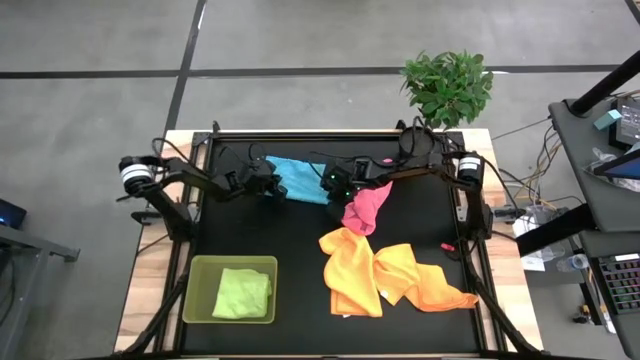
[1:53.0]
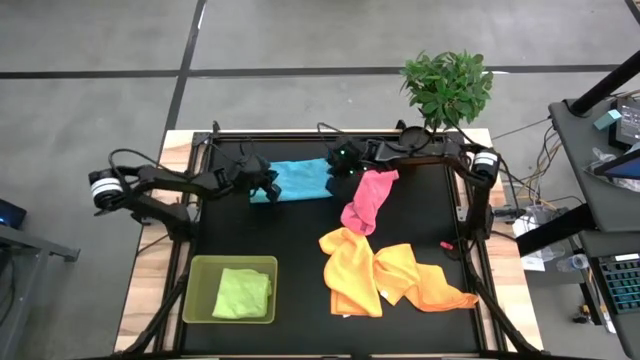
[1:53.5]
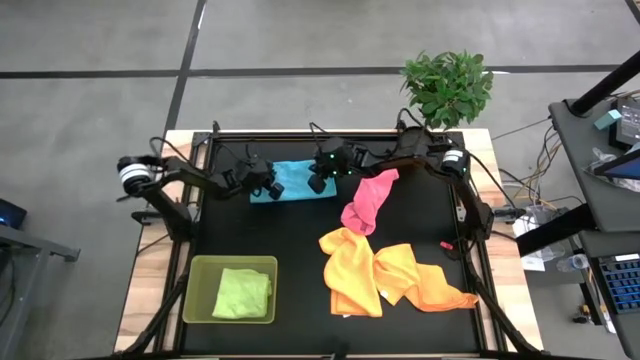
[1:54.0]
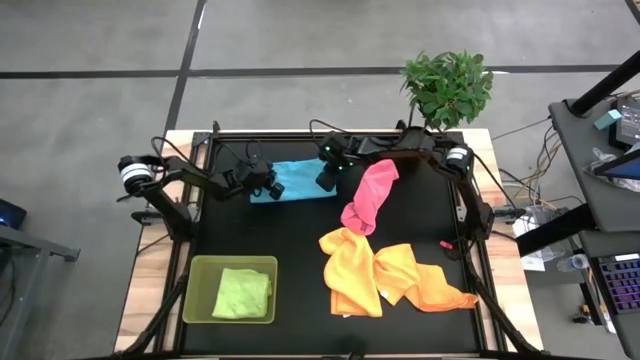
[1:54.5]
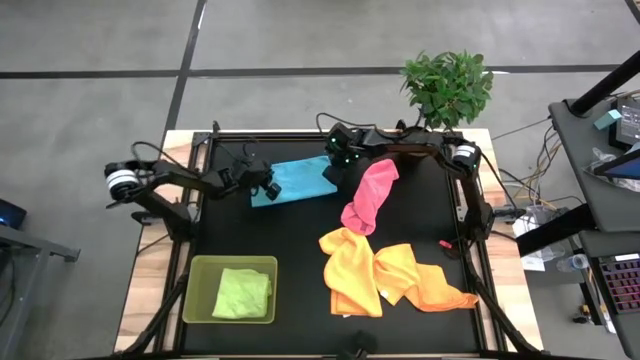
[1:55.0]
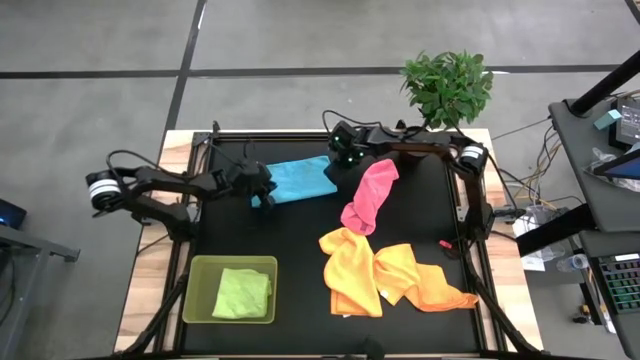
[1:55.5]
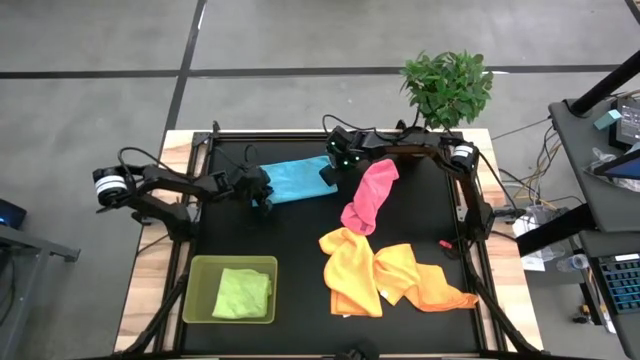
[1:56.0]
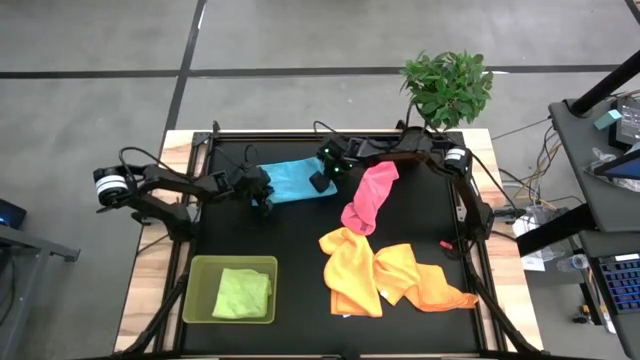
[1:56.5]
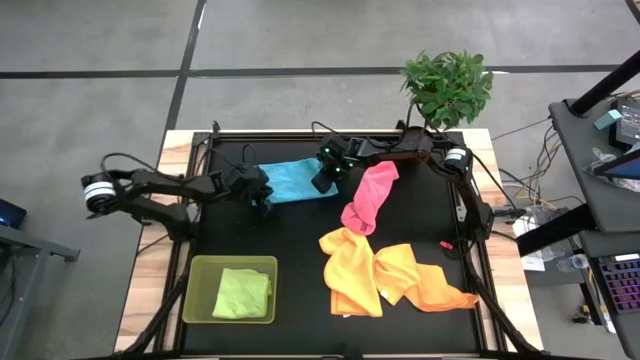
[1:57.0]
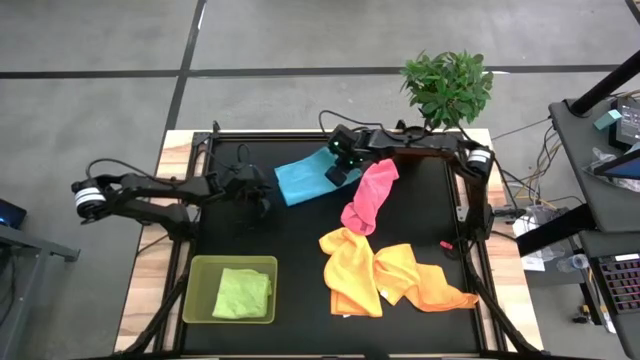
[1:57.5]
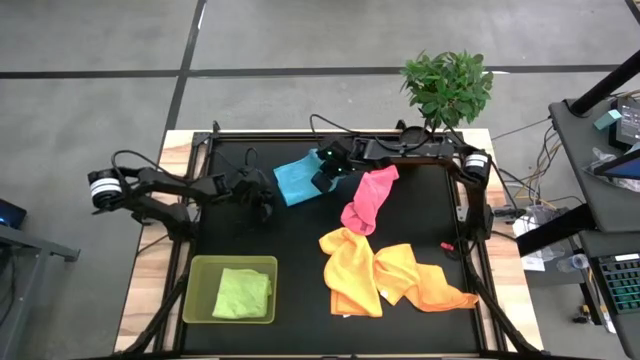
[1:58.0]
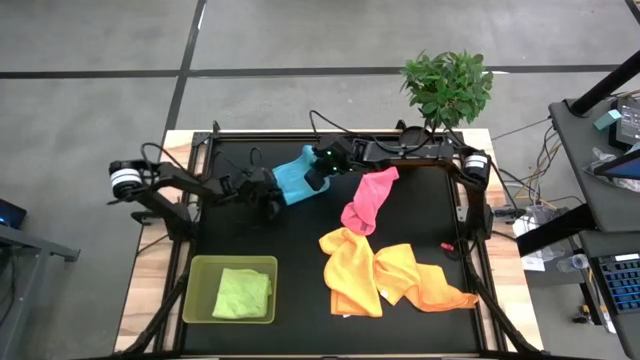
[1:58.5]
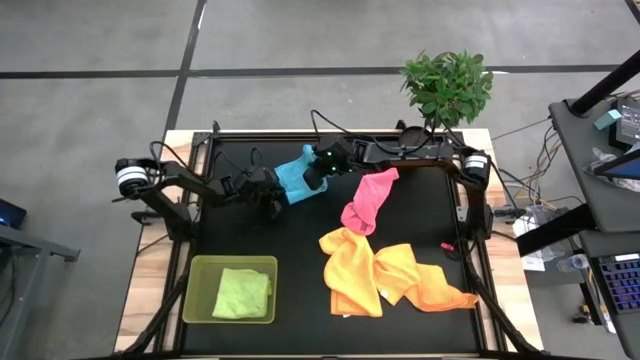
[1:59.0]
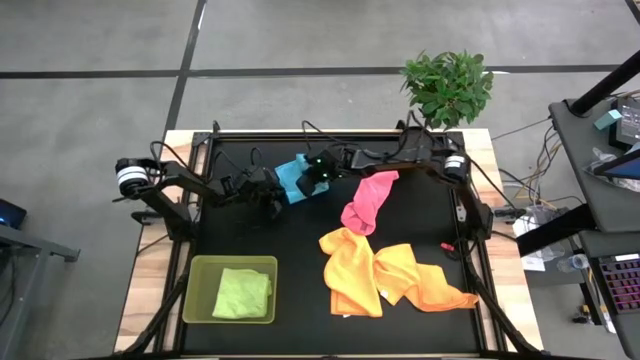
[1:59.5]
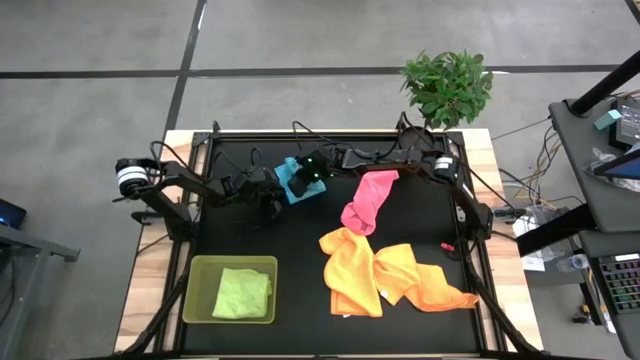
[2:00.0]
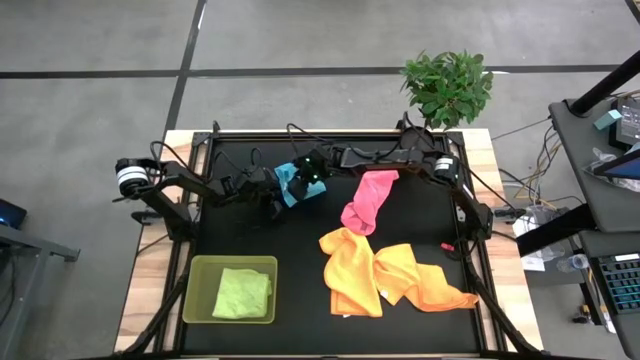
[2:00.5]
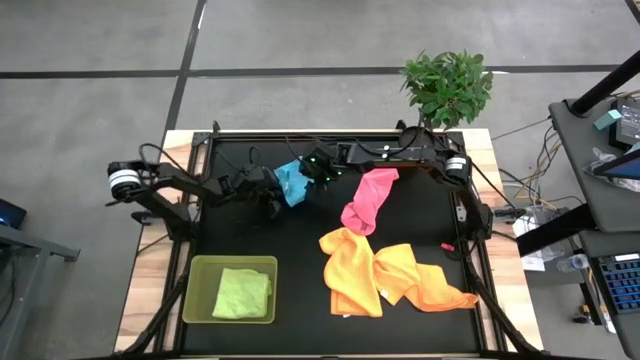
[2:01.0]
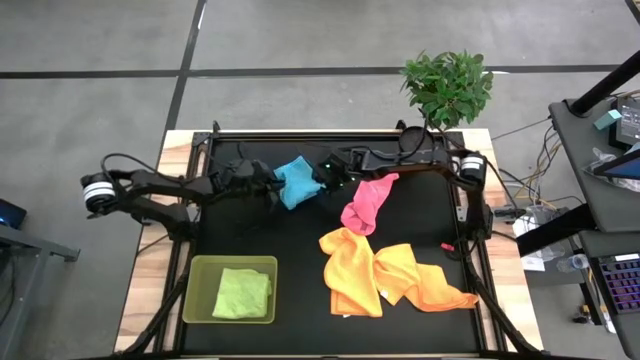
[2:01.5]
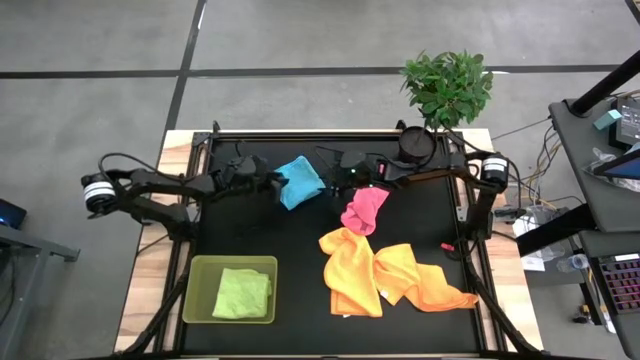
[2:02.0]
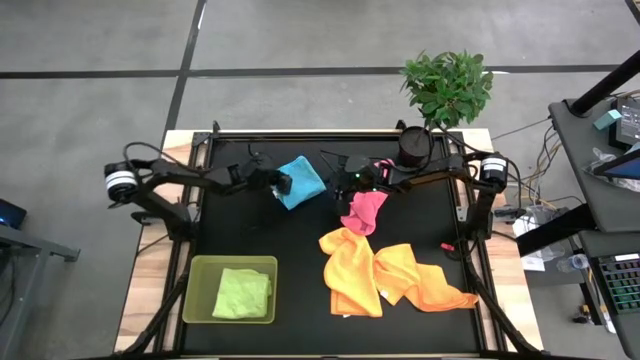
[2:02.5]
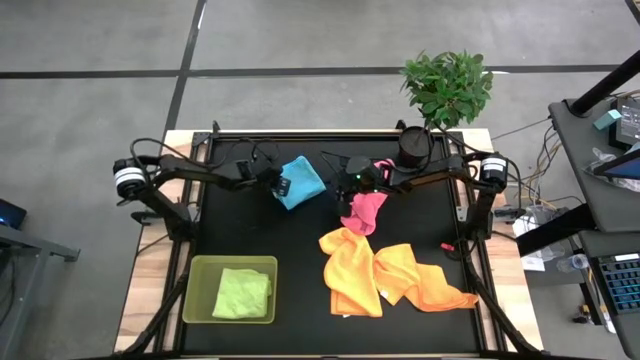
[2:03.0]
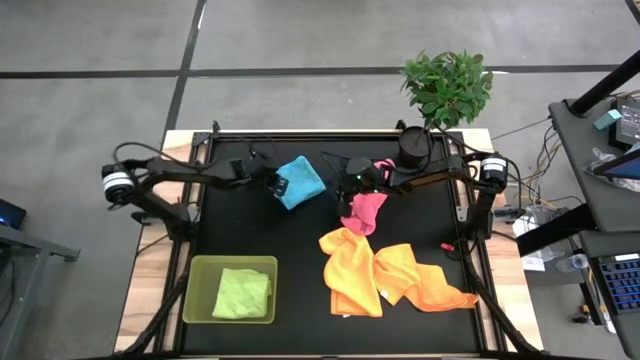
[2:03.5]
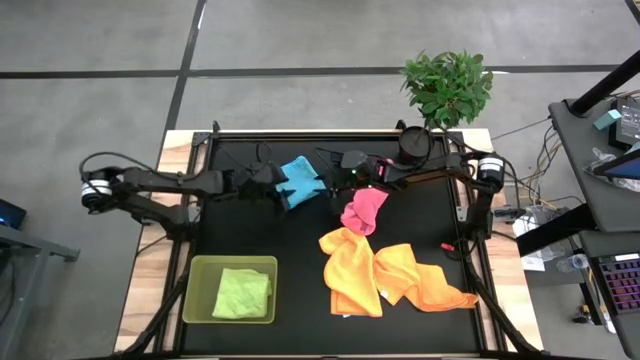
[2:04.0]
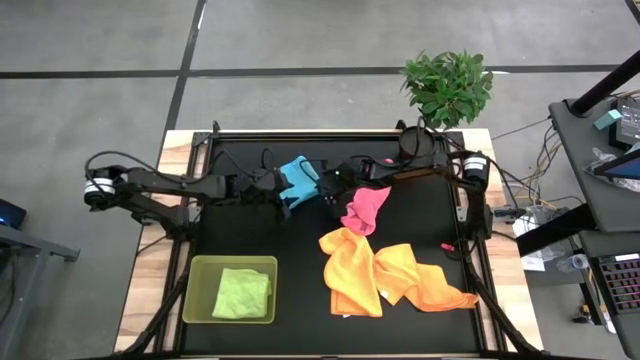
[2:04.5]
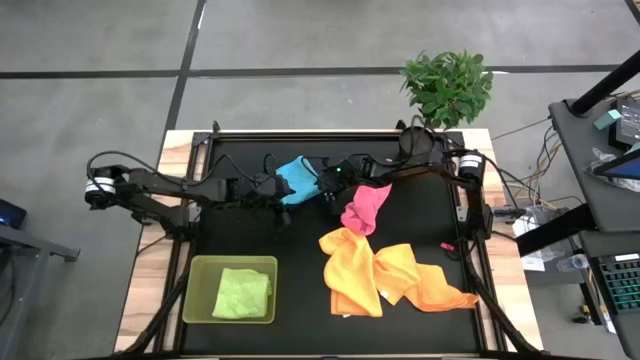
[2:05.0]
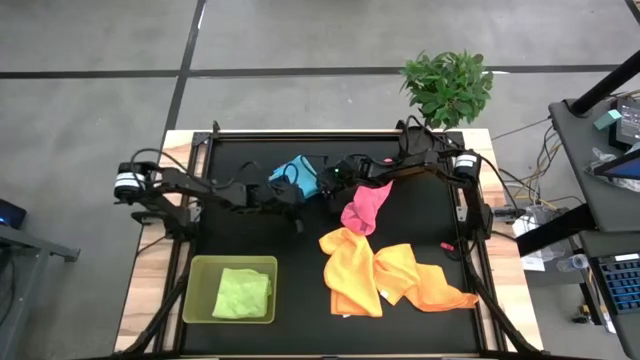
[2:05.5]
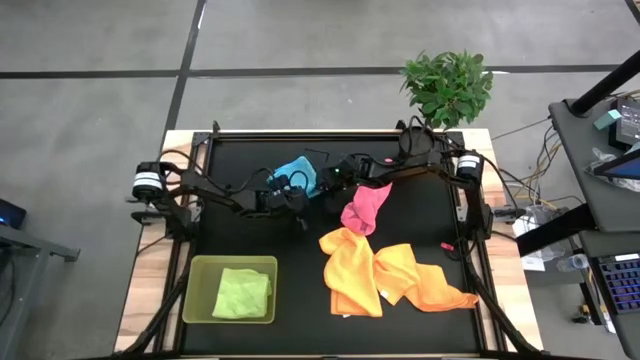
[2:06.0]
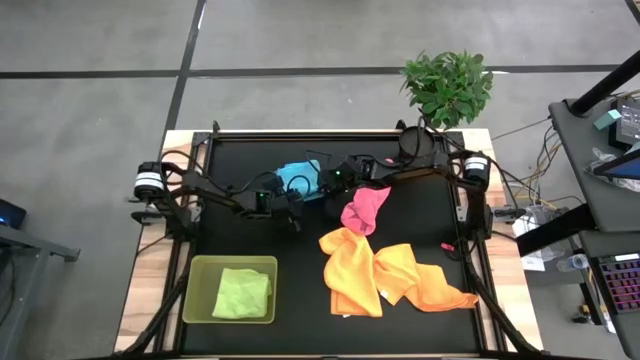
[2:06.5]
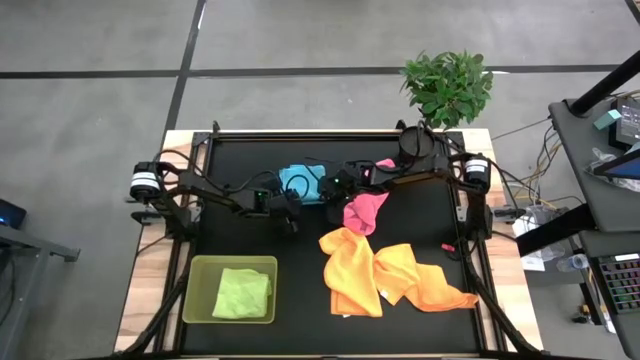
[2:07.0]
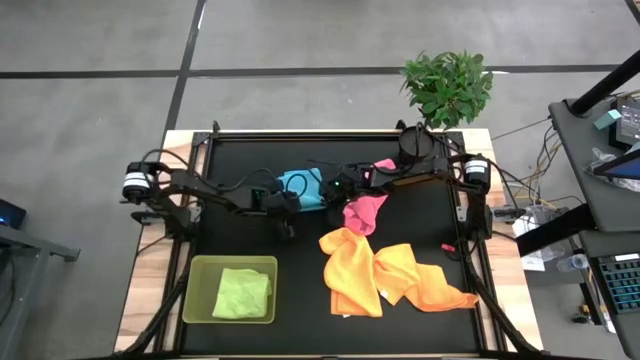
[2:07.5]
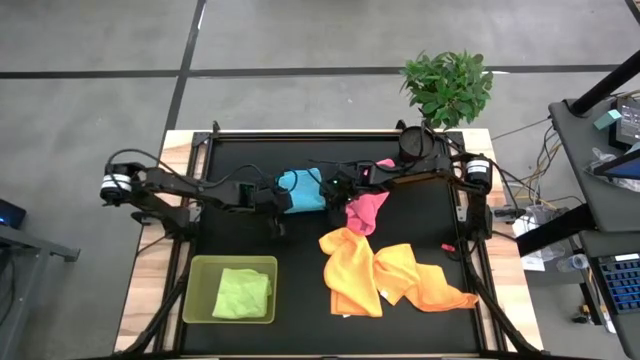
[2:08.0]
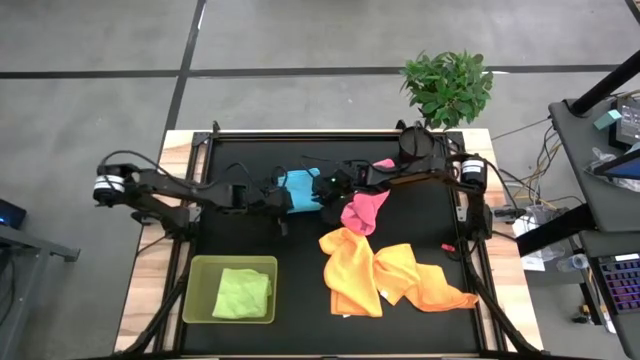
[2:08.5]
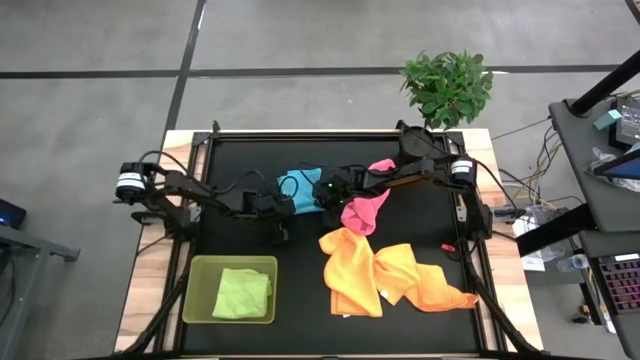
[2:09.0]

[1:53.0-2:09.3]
Task: Fold microfiber towels
Fold the blue microfiber towel

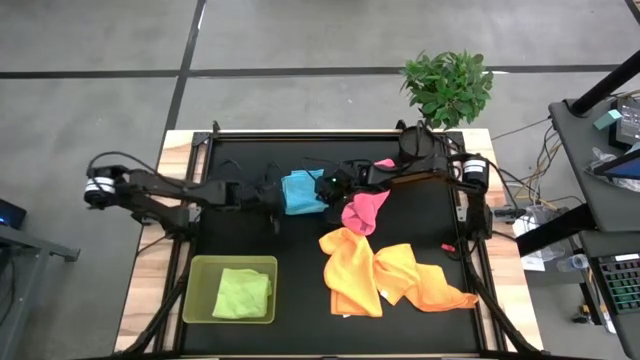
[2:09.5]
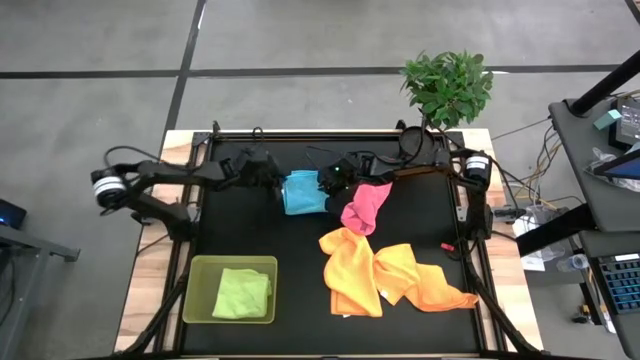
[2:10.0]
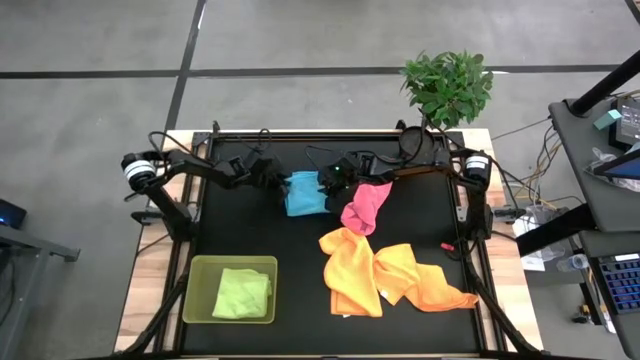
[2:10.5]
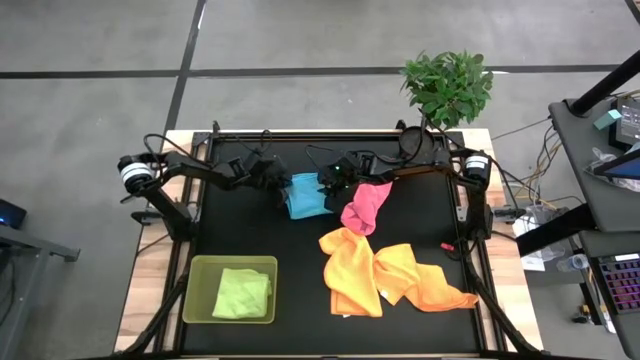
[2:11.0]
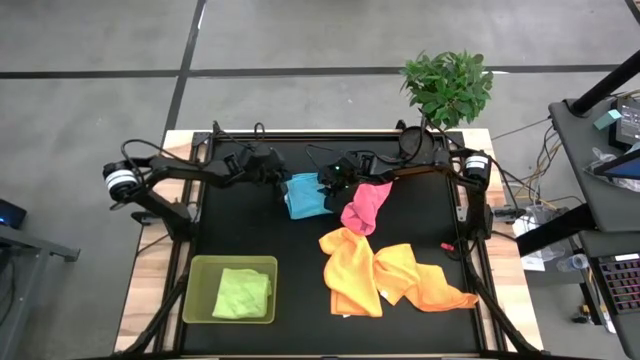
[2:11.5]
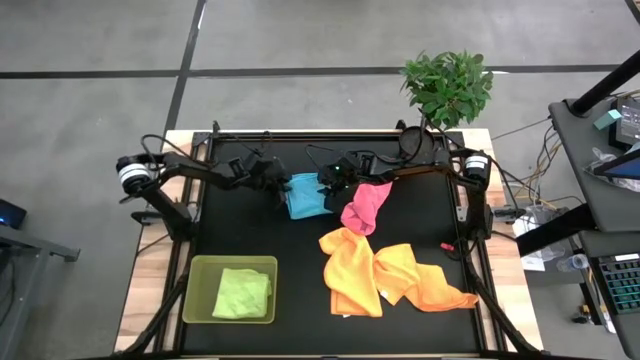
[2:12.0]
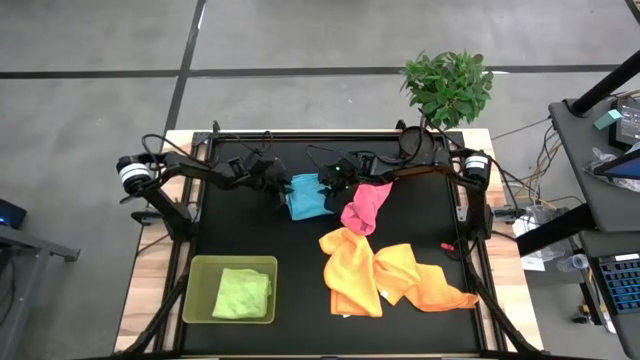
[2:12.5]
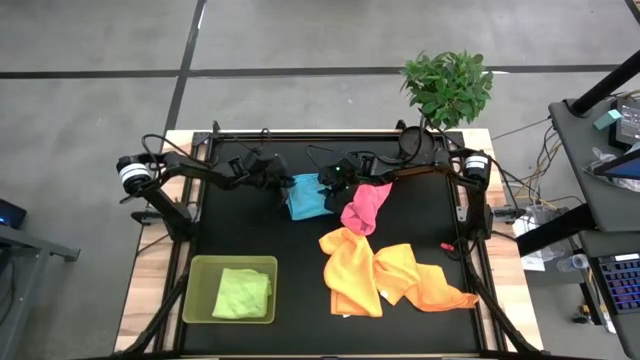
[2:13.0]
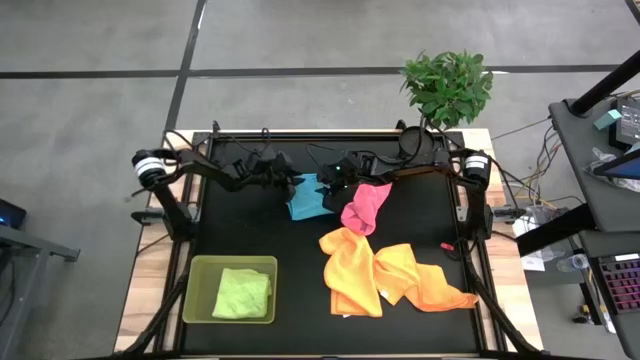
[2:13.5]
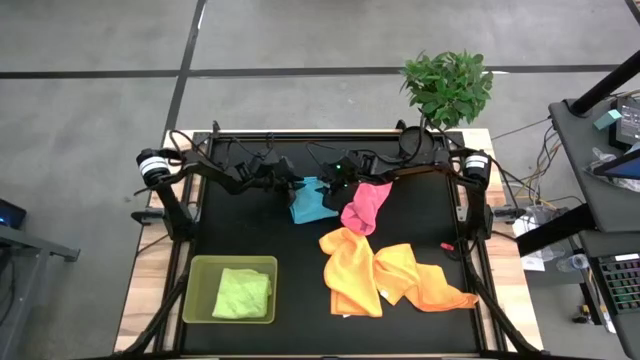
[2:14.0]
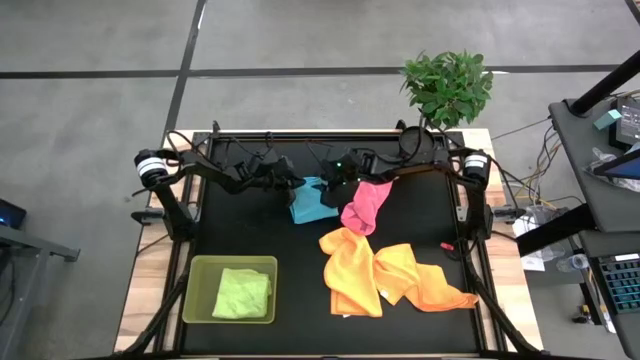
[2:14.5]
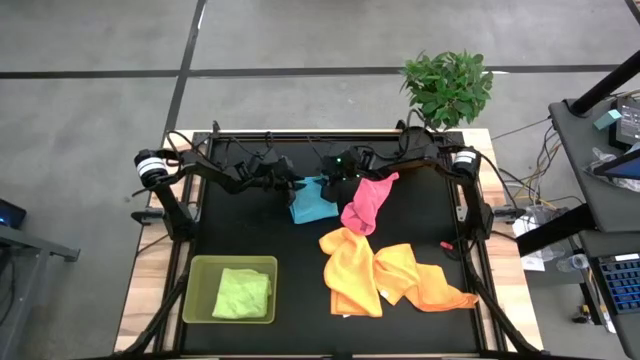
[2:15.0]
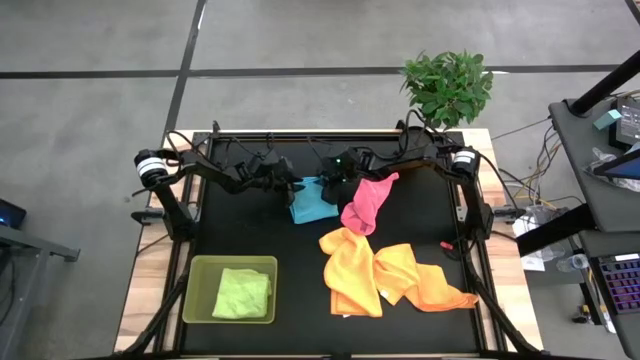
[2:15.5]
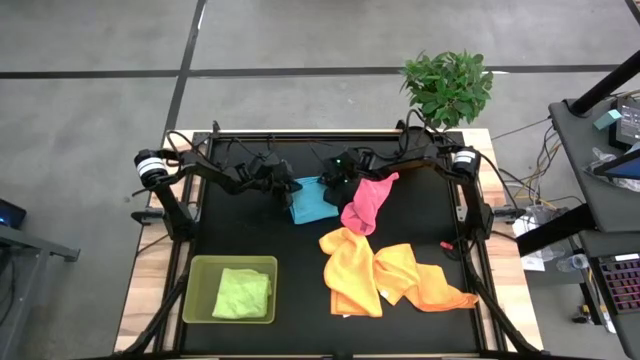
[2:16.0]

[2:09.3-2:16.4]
Put the folded blue microfiber towel into the yellow bin
